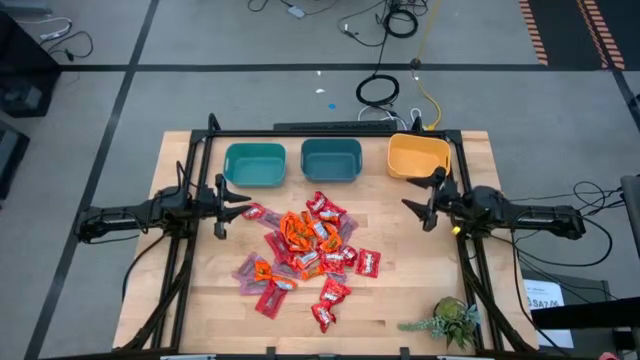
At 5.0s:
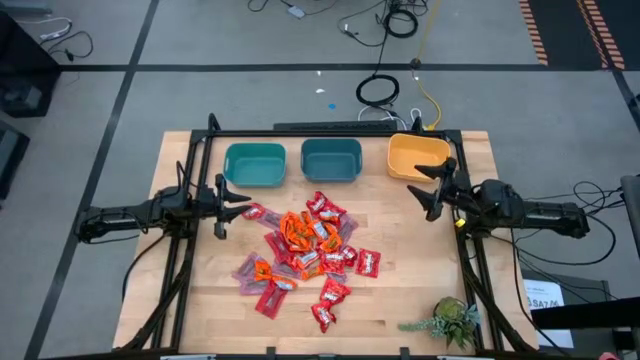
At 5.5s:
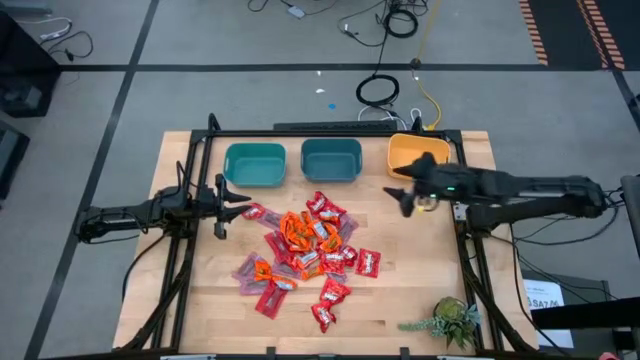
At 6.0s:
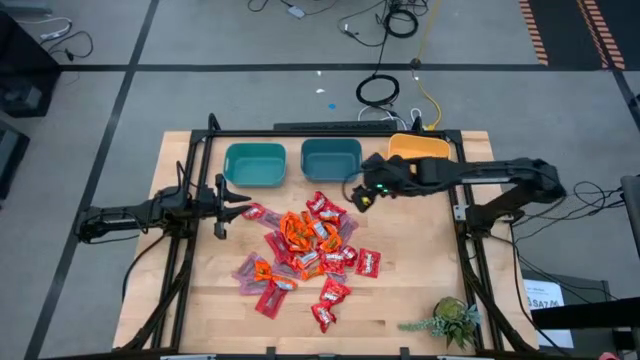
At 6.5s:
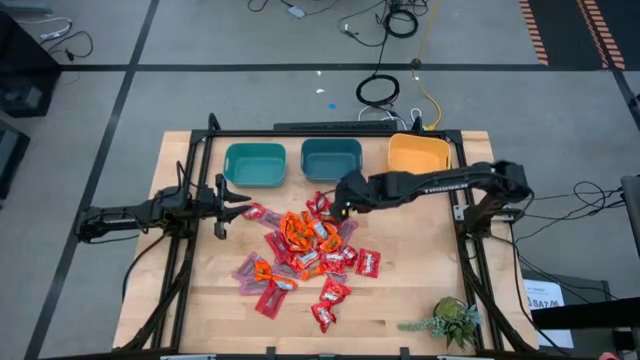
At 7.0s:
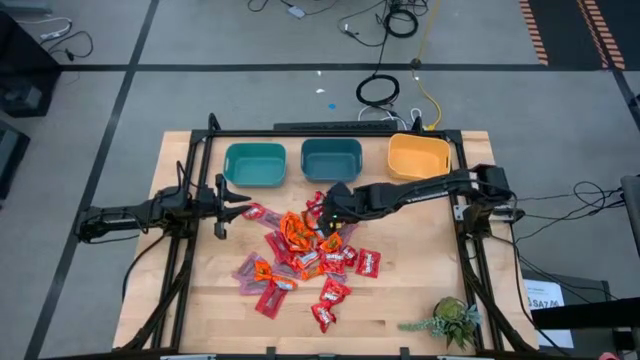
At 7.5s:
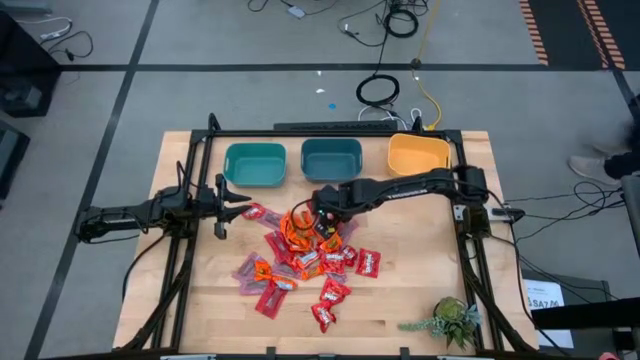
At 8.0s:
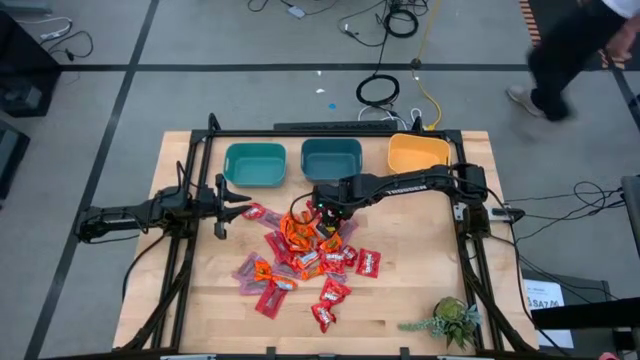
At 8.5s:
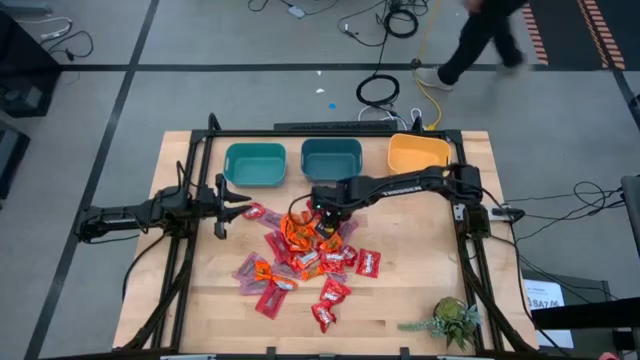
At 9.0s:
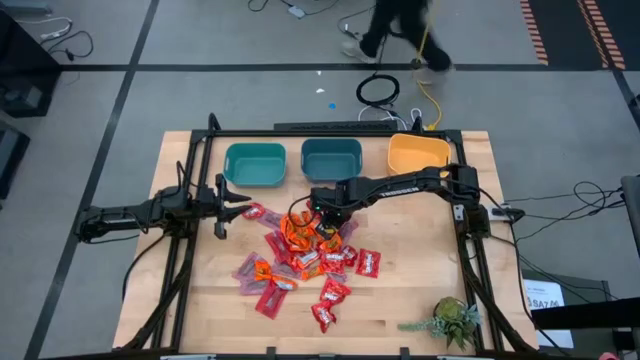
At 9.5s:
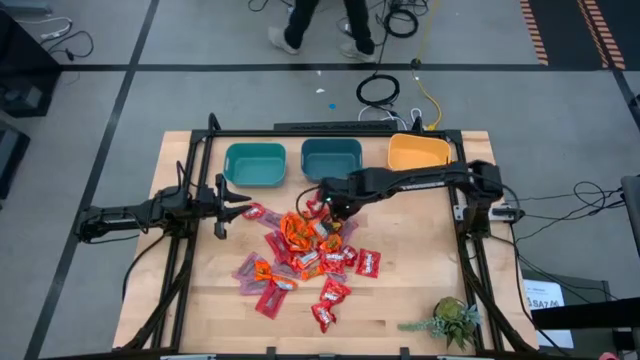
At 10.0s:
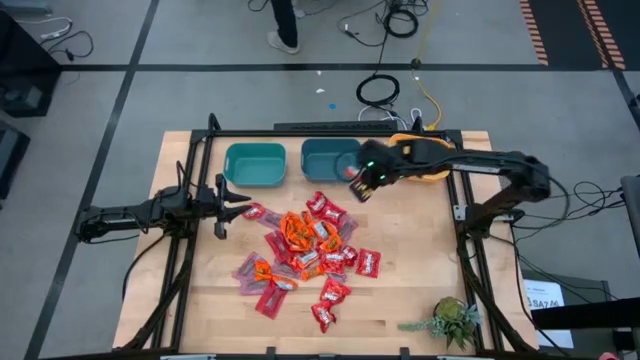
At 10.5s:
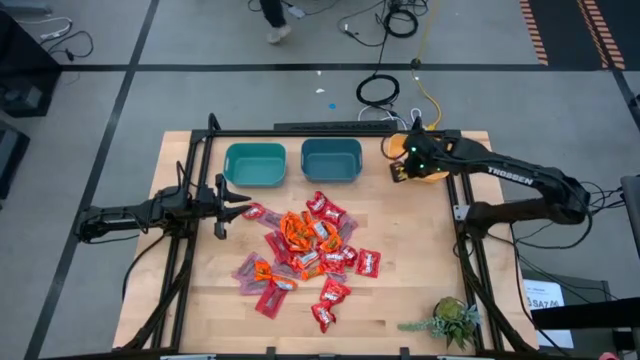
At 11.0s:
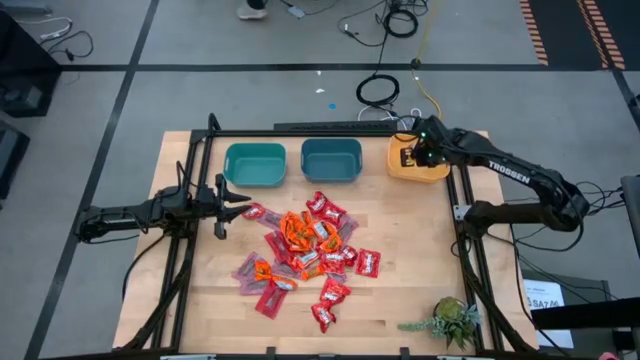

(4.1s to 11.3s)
Task: Sort candy
Put the orange chocolate into the yellow bin

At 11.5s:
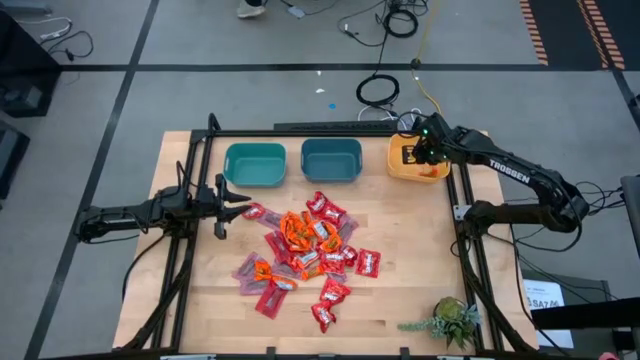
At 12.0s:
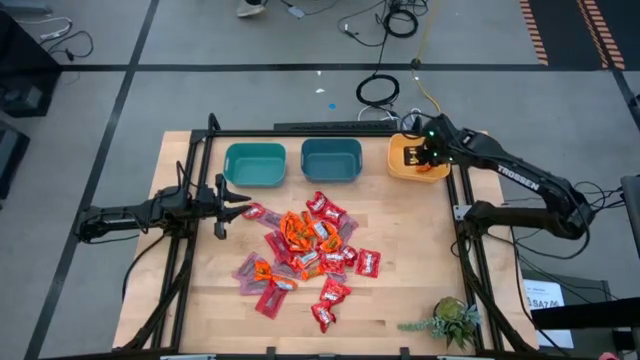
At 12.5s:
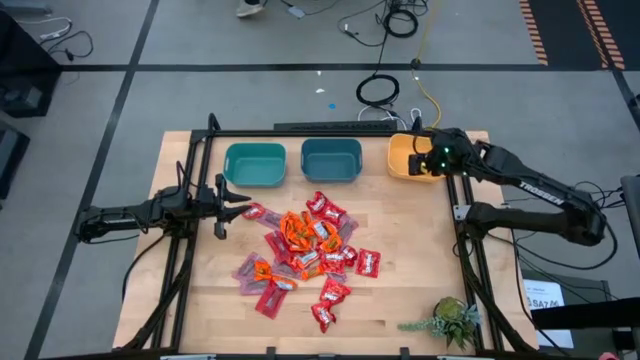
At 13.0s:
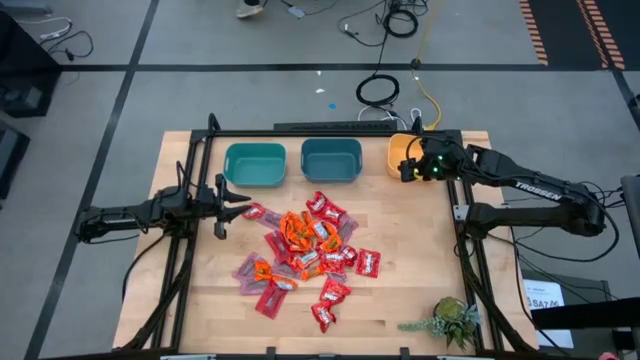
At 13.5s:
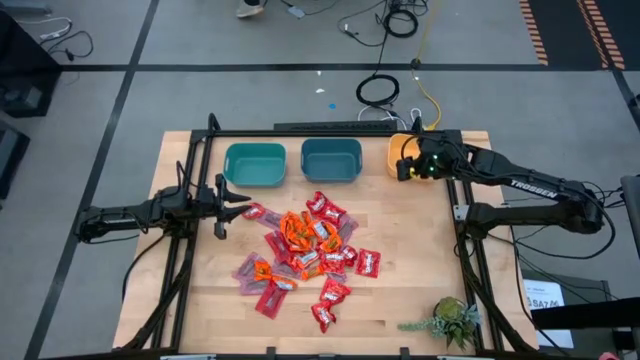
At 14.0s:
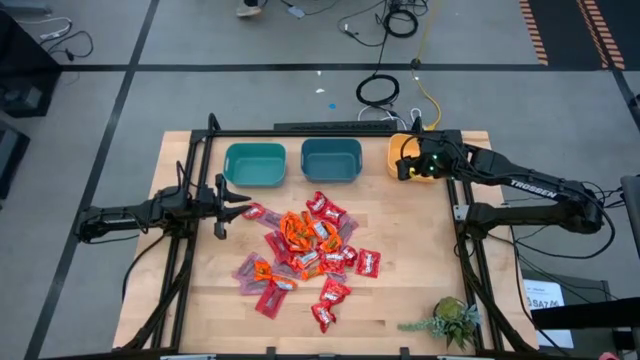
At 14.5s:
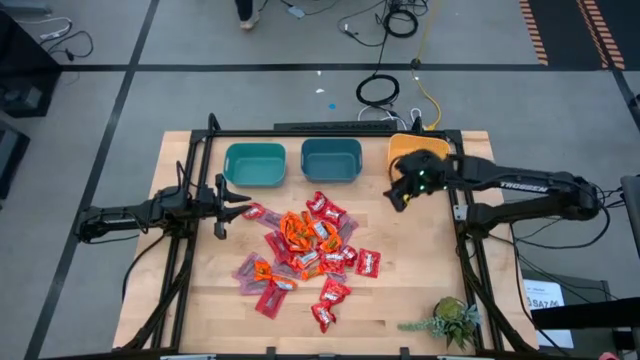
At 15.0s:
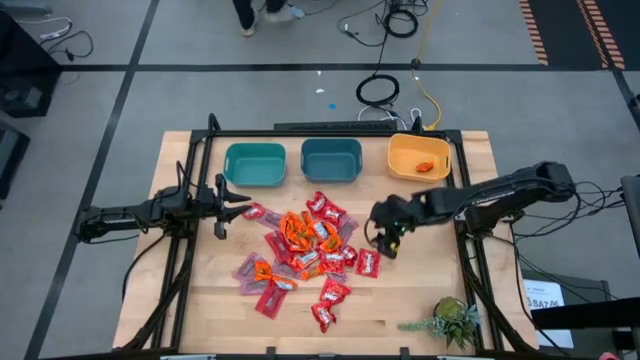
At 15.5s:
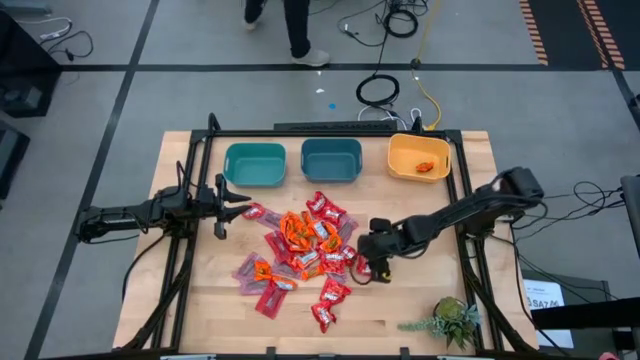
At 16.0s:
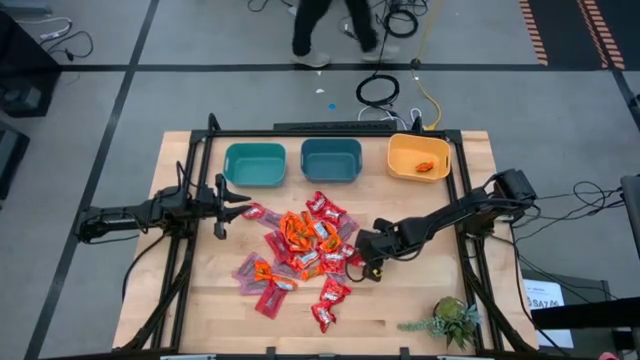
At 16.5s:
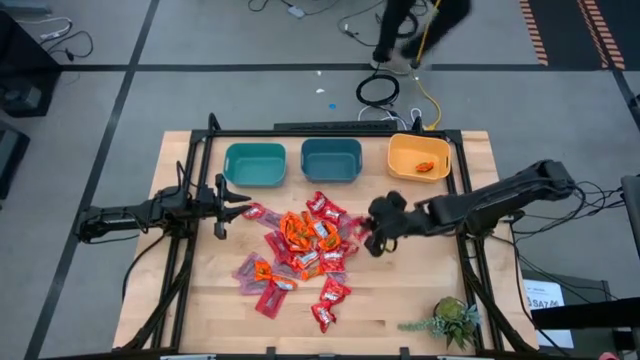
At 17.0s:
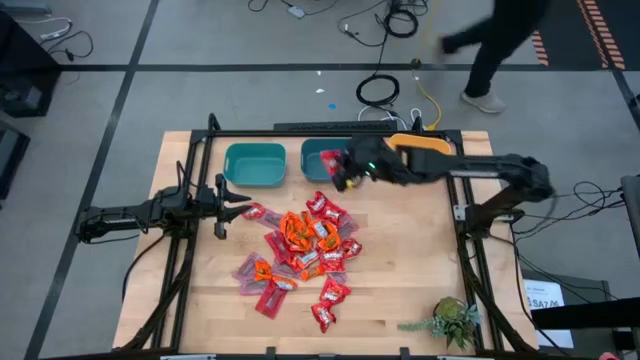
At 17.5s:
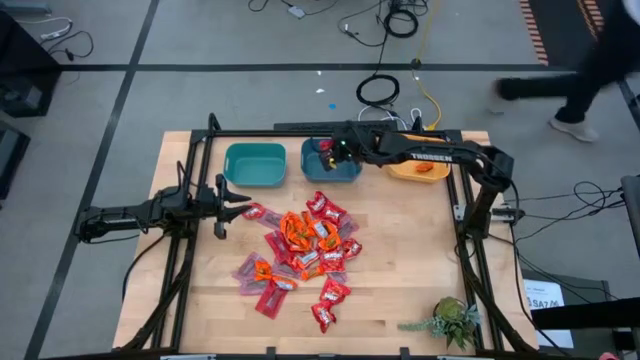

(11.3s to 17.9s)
Put the red candy into the blue bin

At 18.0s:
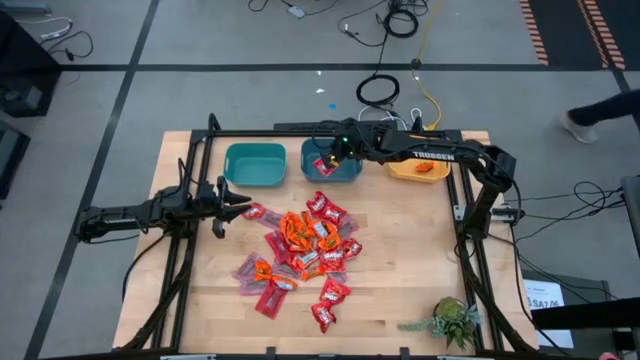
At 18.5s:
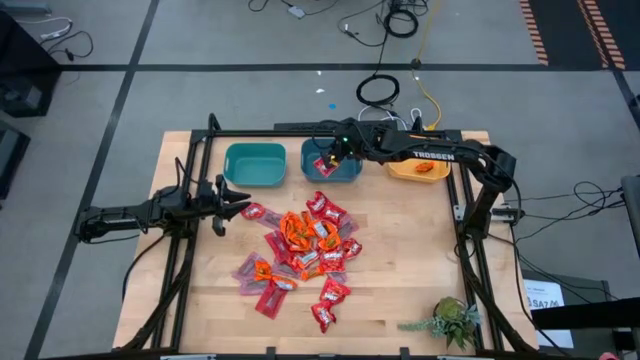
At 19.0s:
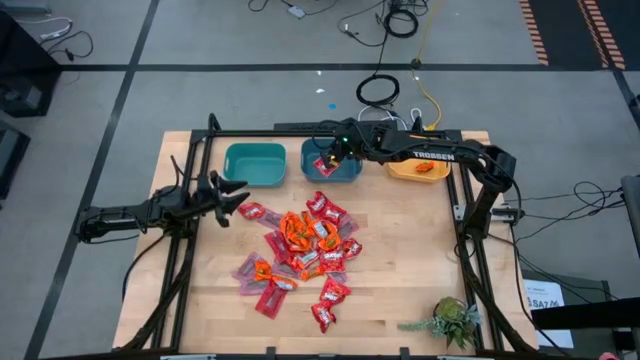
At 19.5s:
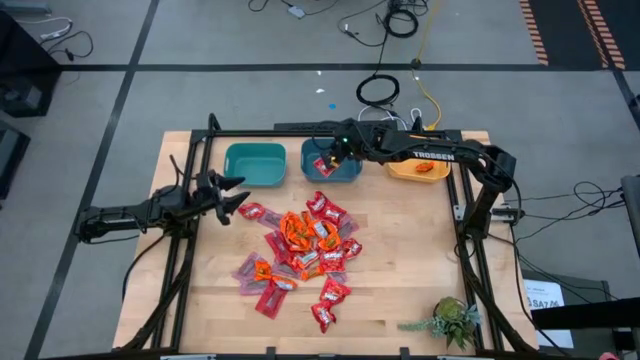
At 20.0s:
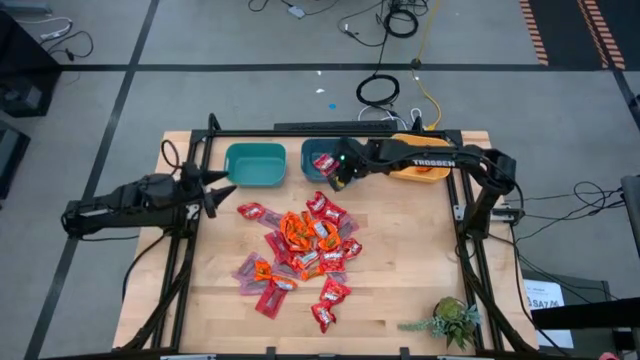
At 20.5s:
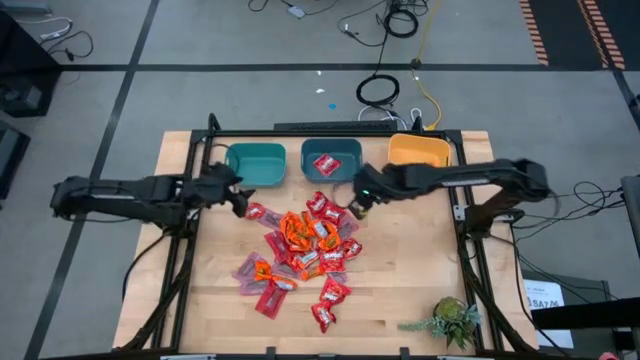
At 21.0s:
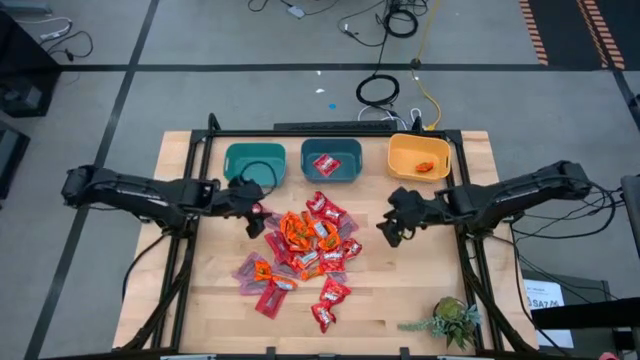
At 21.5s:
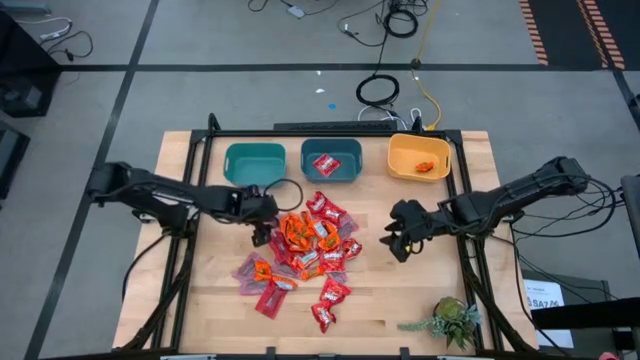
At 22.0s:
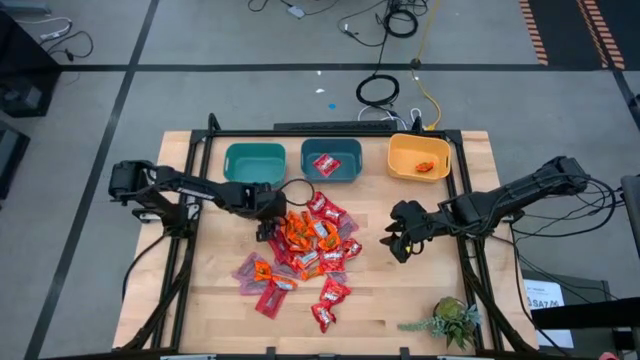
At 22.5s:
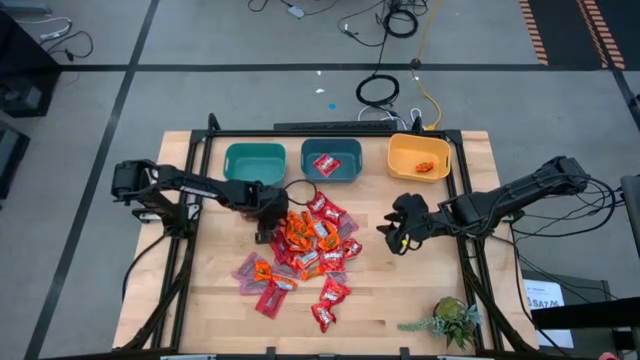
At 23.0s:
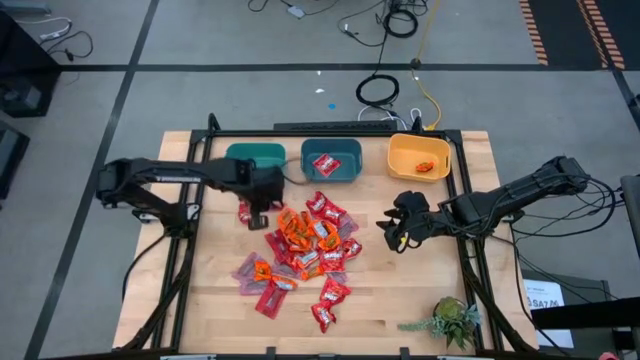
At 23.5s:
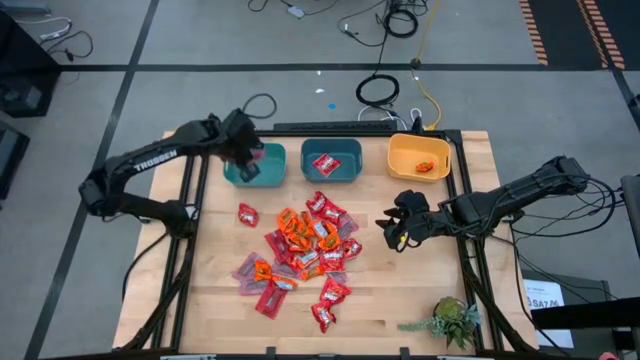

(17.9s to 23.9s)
Put the red chocolate into the green bin

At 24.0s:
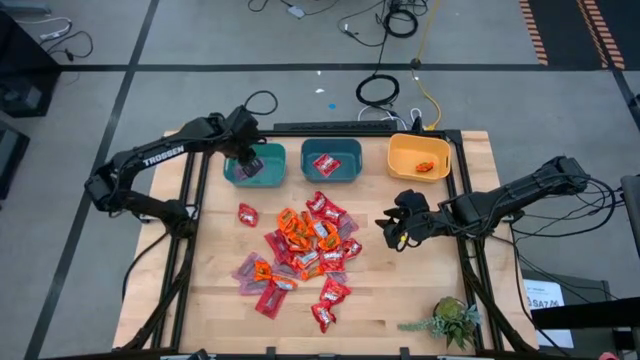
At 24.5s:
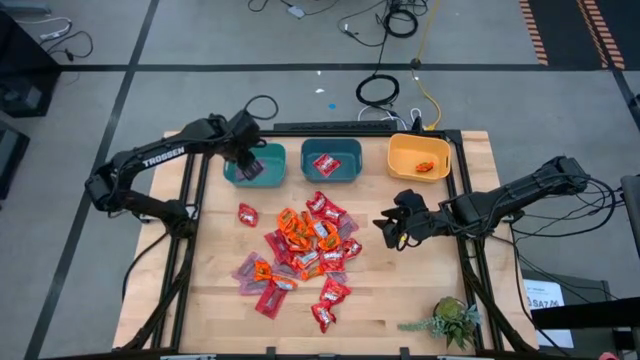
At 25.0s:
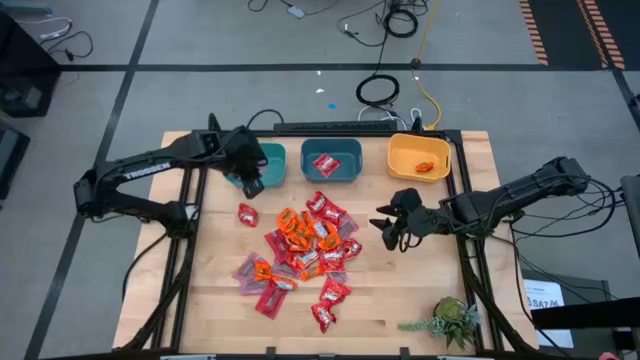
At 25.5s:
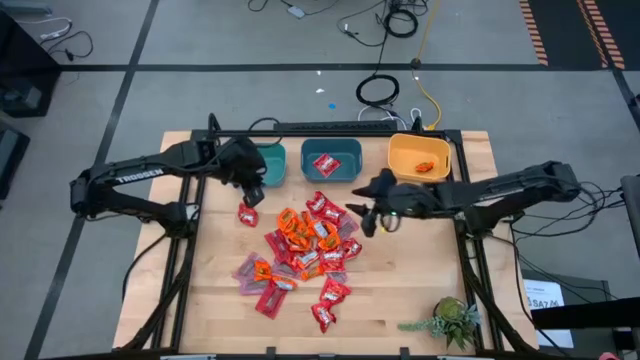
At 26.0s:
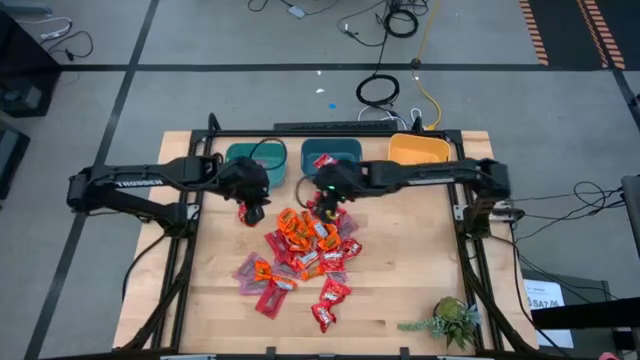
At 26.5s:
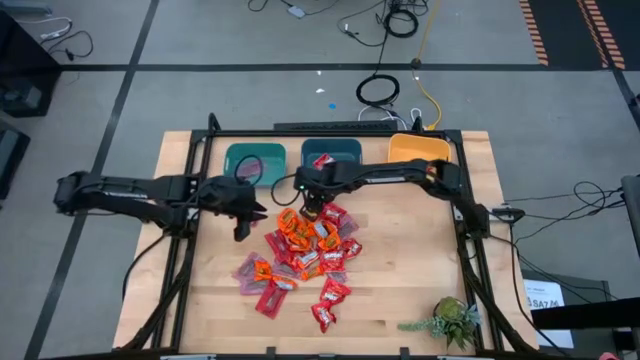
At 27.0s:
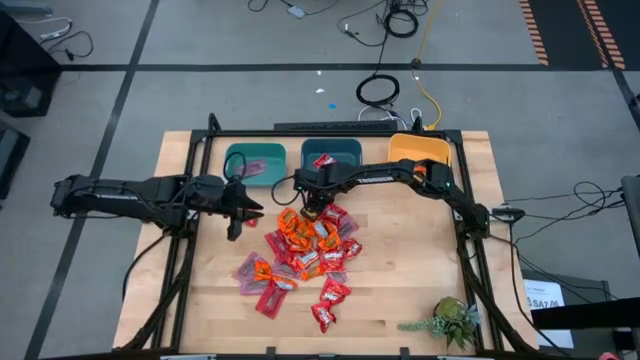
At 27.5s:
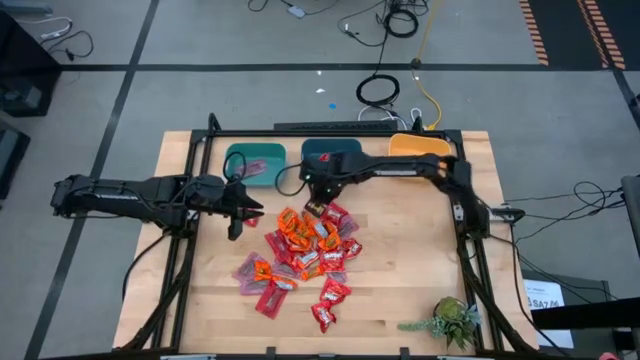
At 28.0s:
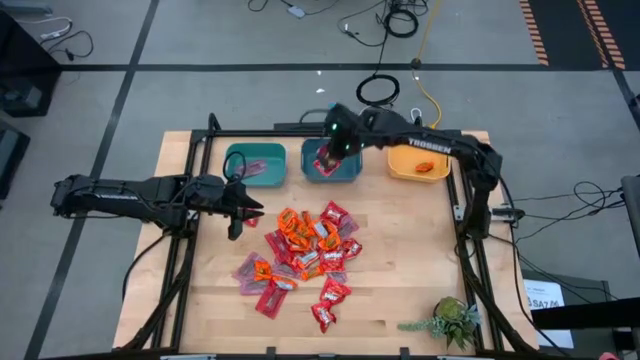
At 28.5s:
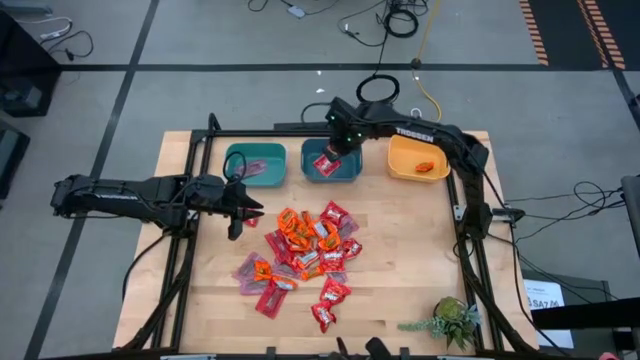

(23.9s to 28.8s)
Put the red candy into the blue bin
